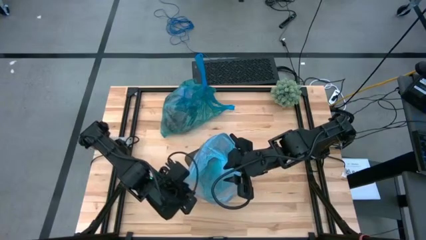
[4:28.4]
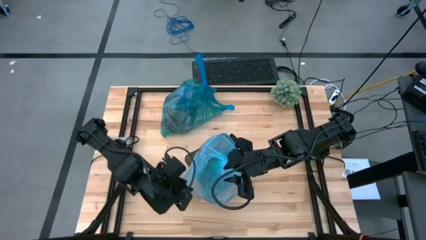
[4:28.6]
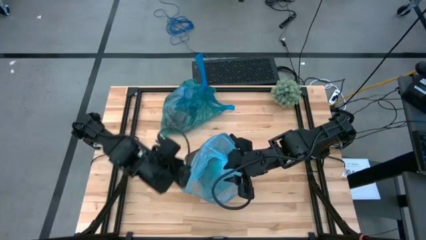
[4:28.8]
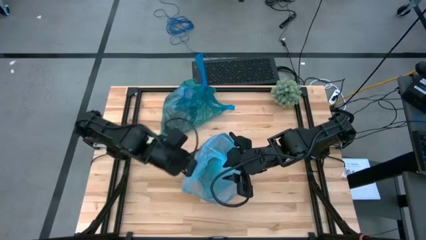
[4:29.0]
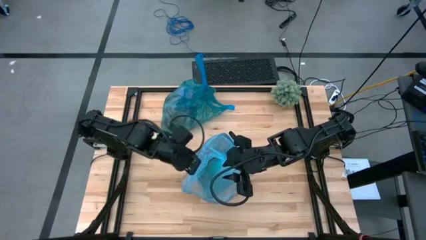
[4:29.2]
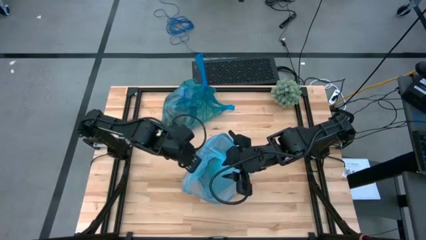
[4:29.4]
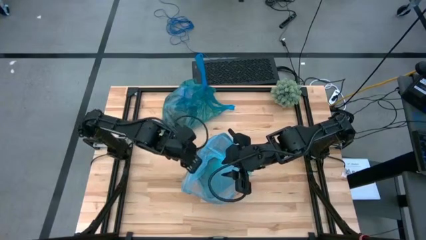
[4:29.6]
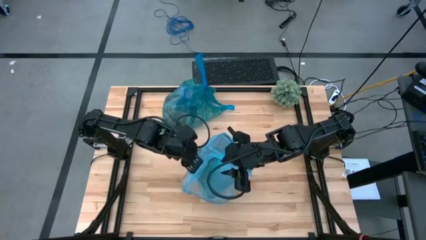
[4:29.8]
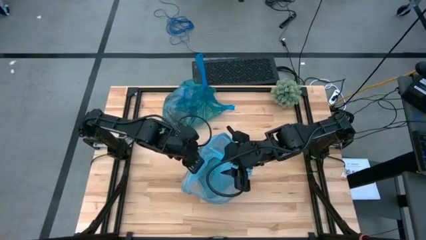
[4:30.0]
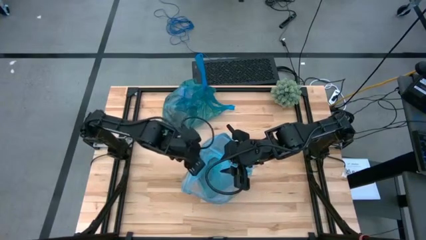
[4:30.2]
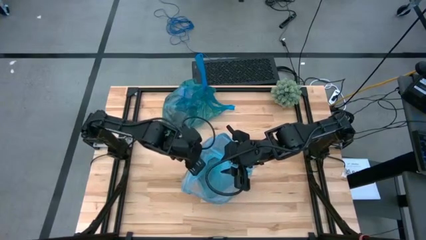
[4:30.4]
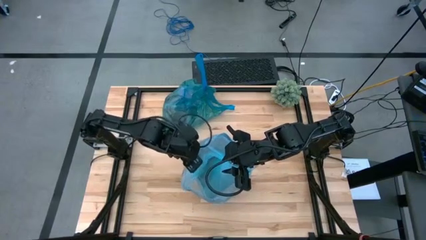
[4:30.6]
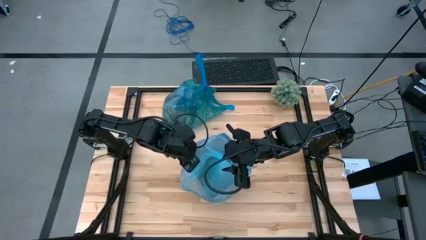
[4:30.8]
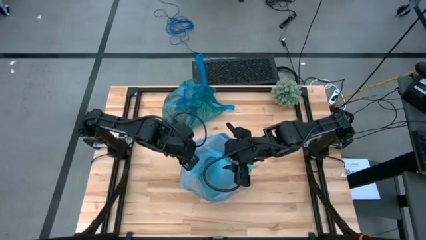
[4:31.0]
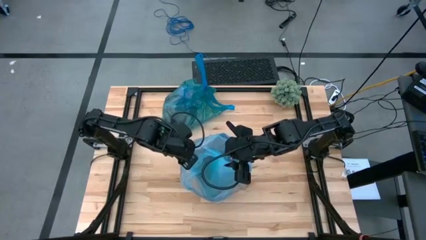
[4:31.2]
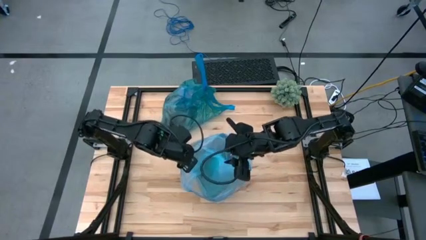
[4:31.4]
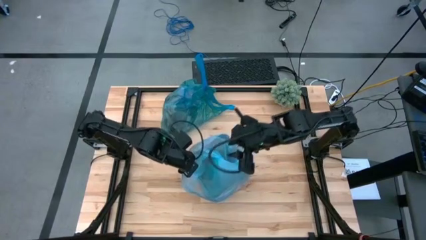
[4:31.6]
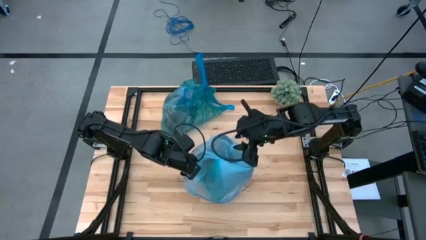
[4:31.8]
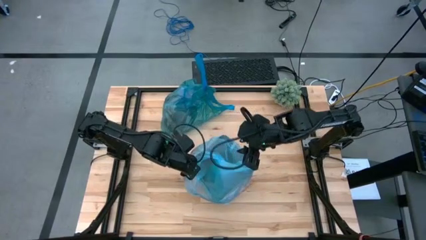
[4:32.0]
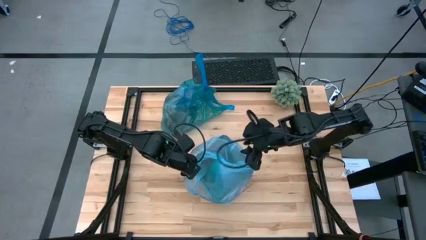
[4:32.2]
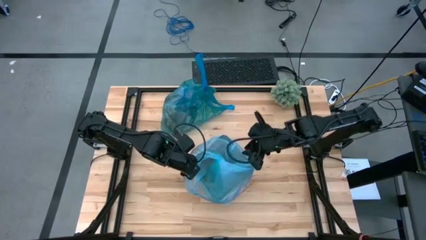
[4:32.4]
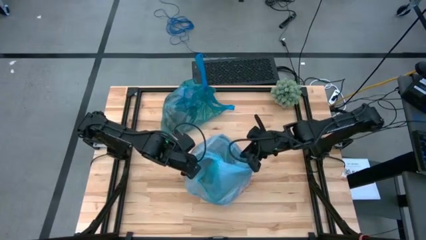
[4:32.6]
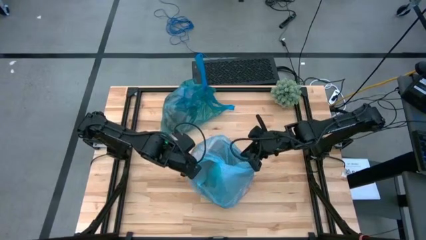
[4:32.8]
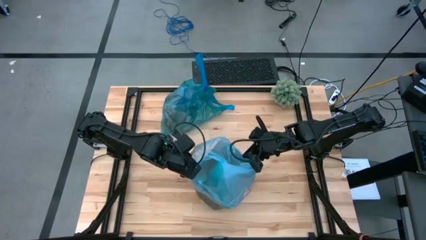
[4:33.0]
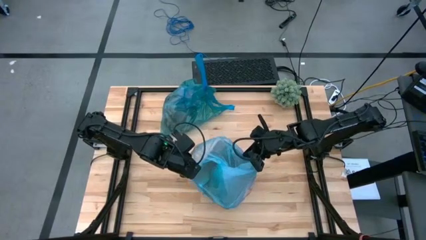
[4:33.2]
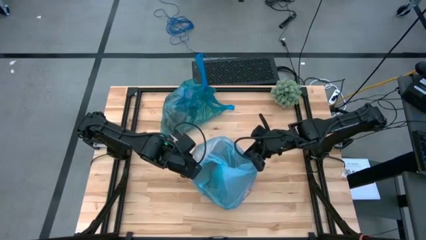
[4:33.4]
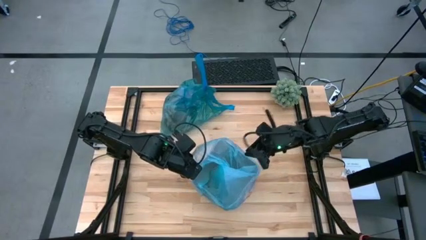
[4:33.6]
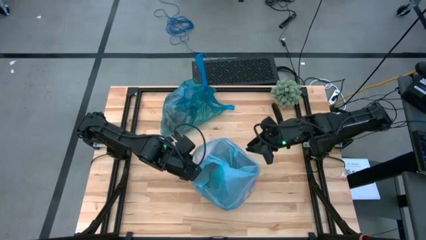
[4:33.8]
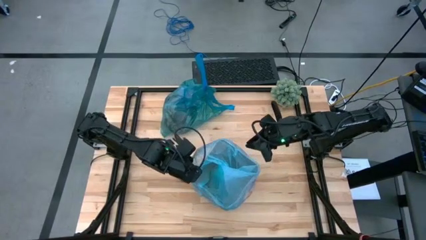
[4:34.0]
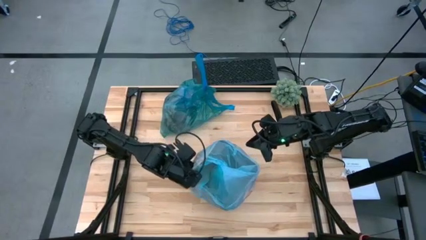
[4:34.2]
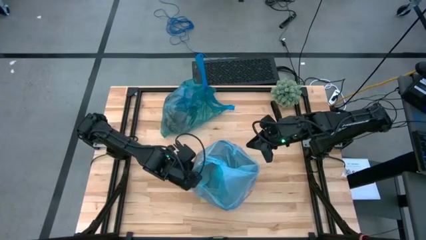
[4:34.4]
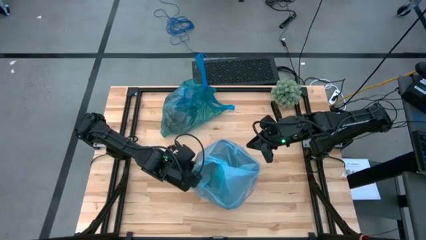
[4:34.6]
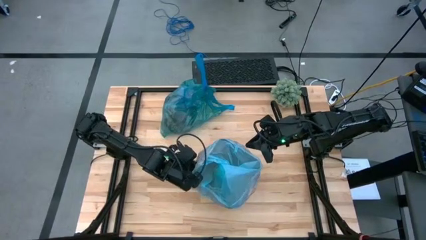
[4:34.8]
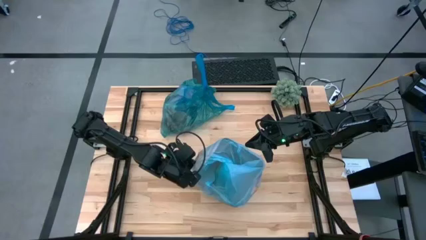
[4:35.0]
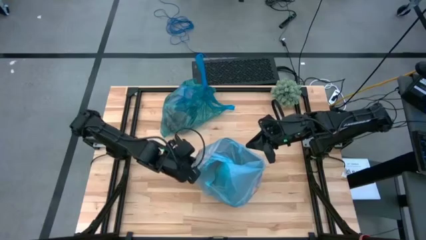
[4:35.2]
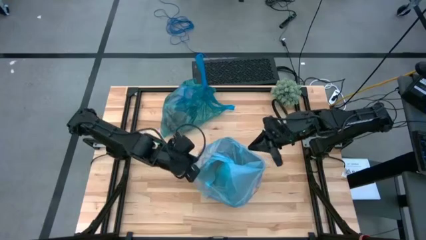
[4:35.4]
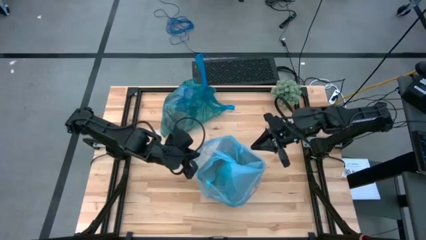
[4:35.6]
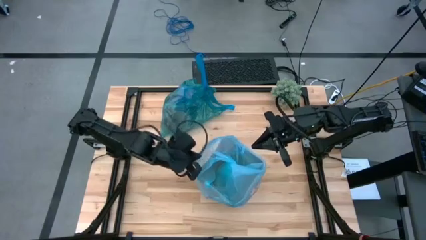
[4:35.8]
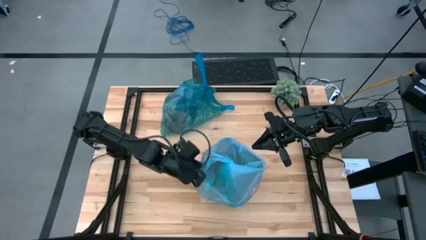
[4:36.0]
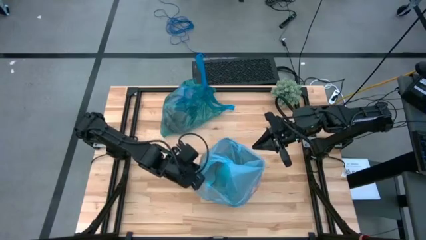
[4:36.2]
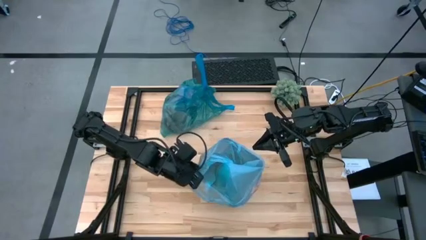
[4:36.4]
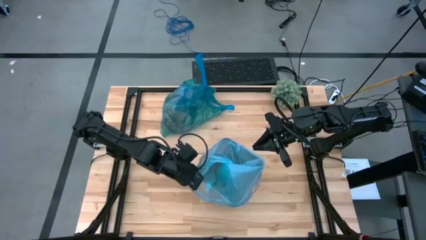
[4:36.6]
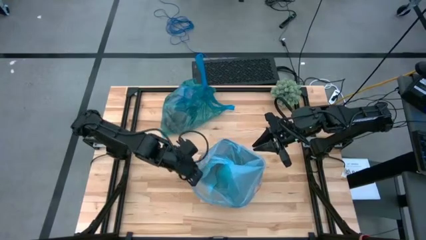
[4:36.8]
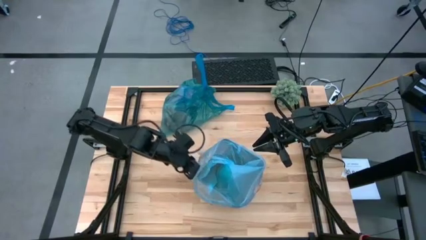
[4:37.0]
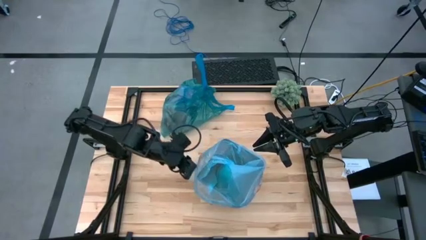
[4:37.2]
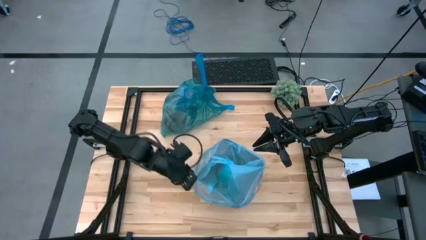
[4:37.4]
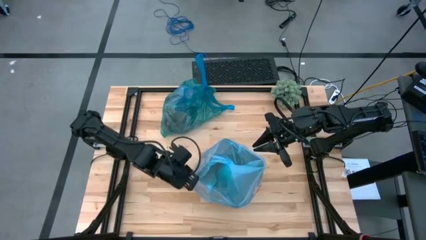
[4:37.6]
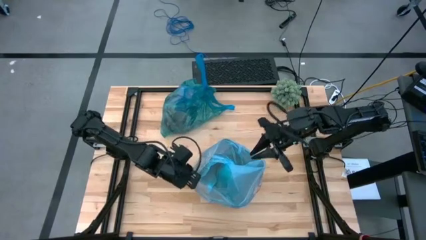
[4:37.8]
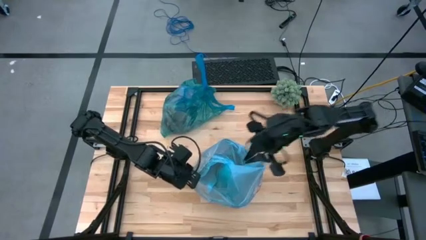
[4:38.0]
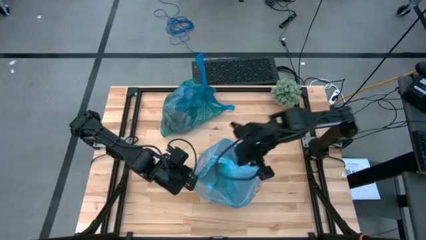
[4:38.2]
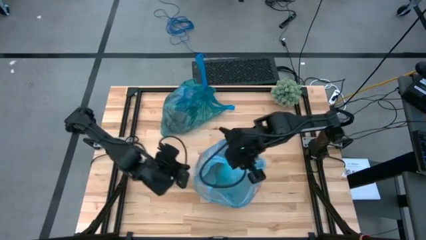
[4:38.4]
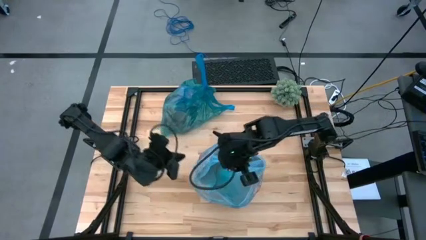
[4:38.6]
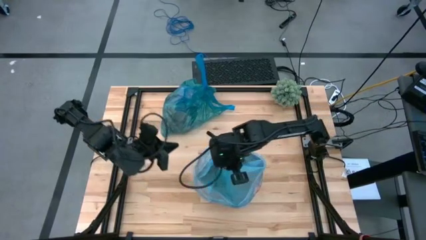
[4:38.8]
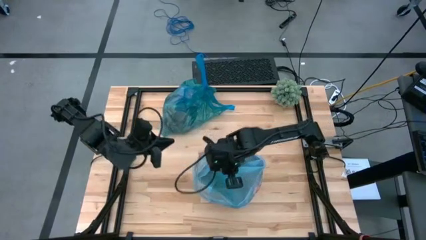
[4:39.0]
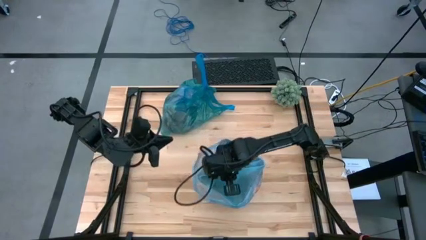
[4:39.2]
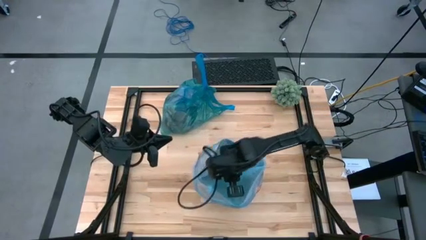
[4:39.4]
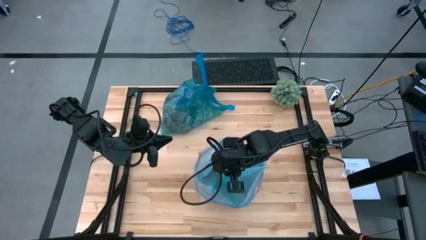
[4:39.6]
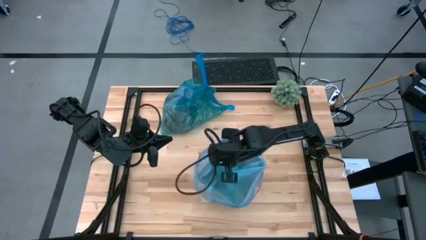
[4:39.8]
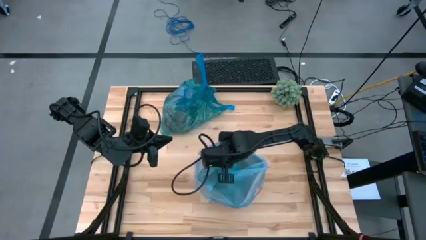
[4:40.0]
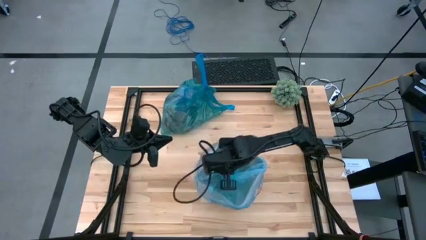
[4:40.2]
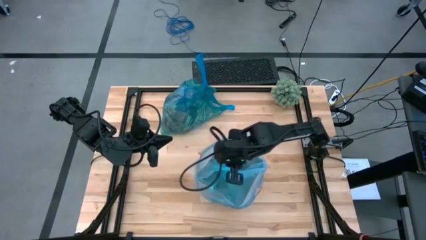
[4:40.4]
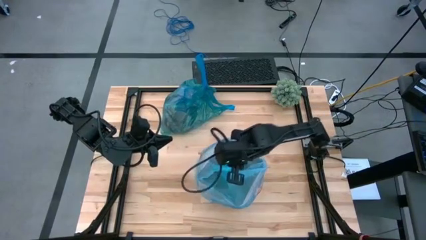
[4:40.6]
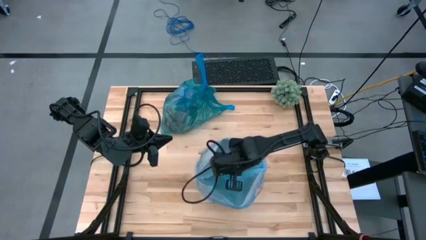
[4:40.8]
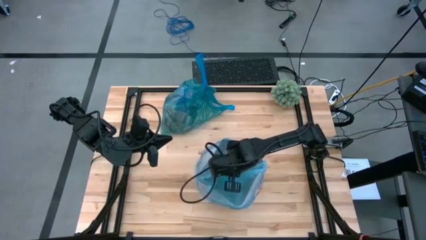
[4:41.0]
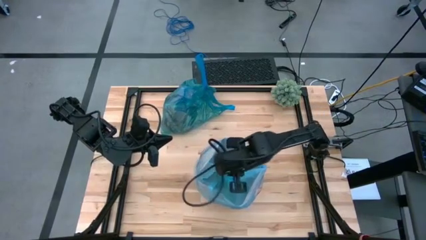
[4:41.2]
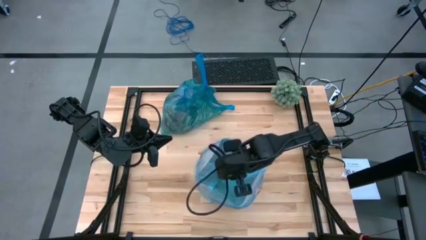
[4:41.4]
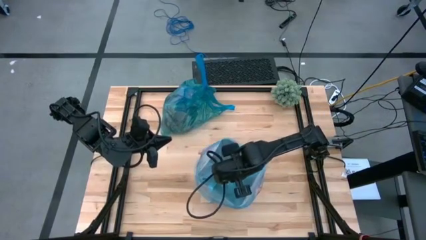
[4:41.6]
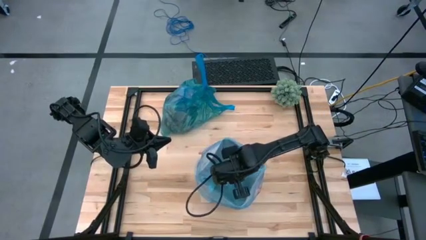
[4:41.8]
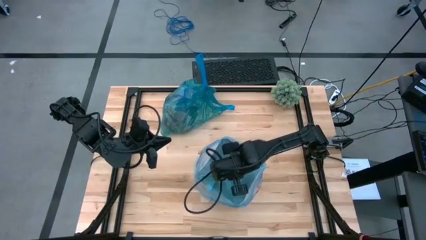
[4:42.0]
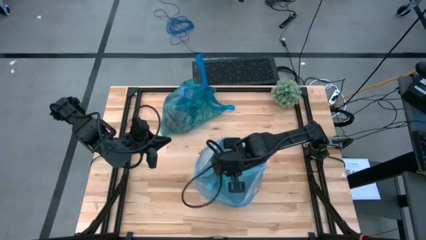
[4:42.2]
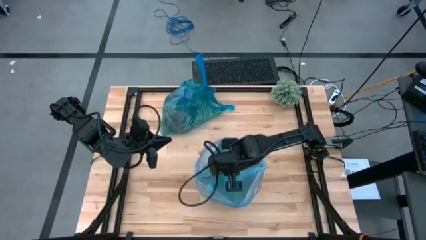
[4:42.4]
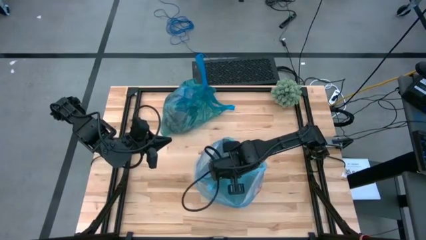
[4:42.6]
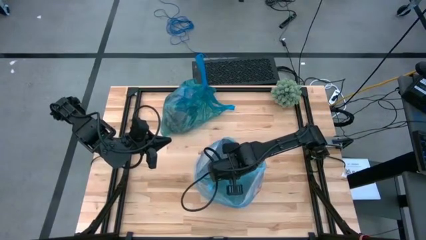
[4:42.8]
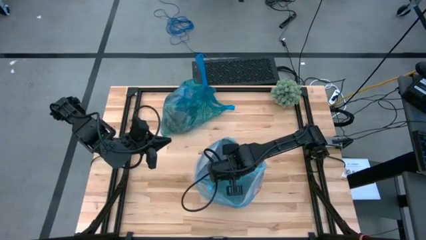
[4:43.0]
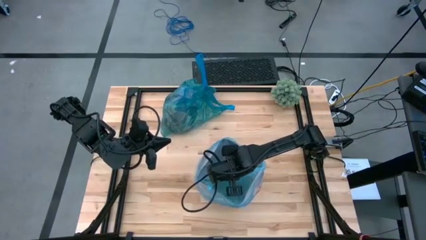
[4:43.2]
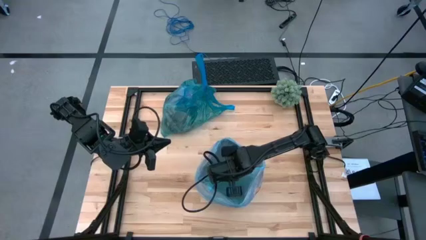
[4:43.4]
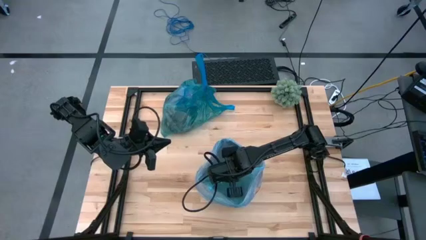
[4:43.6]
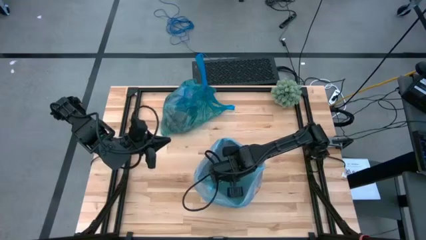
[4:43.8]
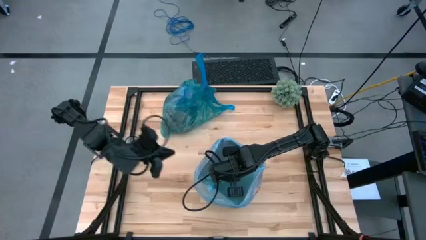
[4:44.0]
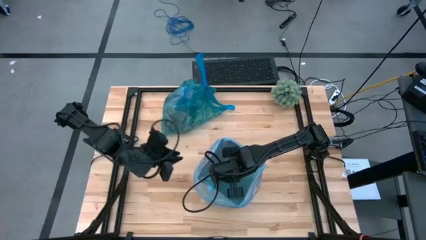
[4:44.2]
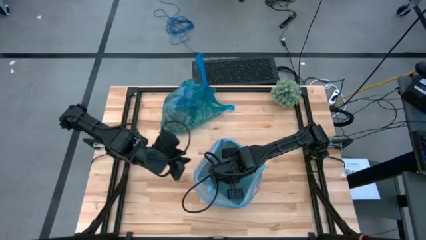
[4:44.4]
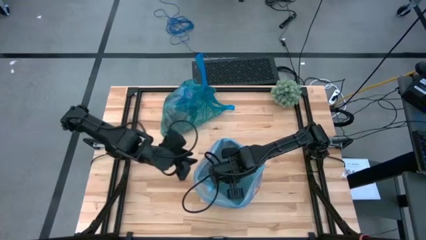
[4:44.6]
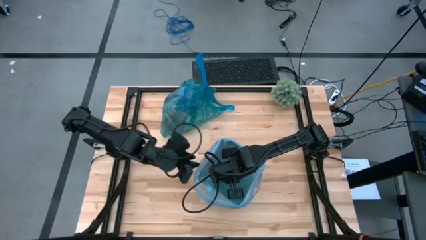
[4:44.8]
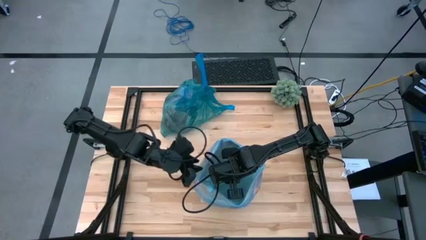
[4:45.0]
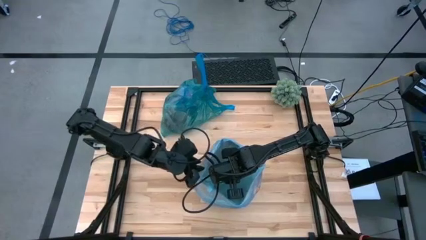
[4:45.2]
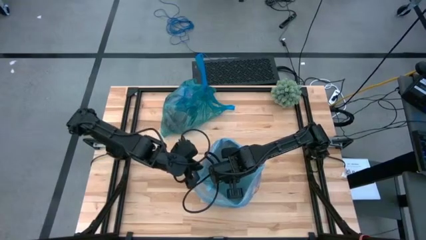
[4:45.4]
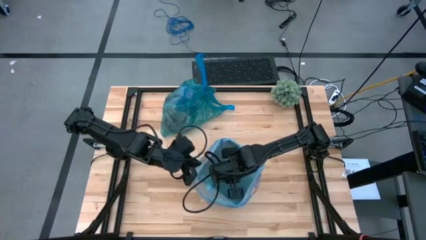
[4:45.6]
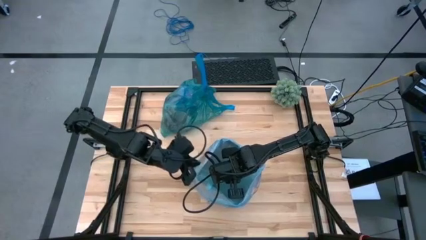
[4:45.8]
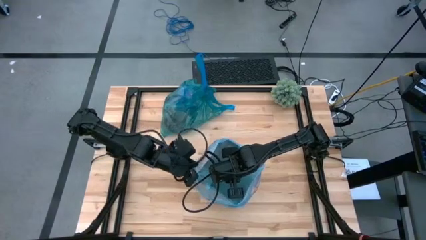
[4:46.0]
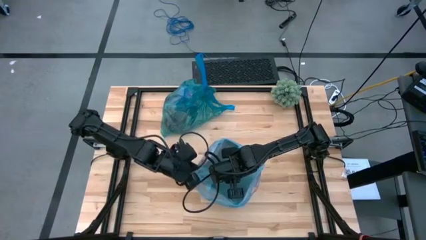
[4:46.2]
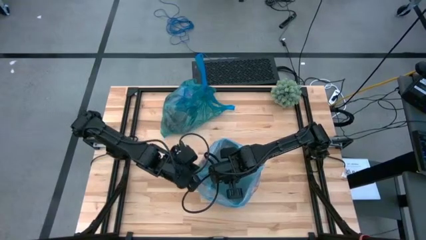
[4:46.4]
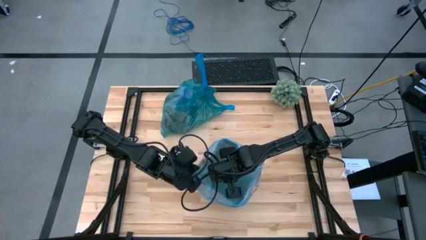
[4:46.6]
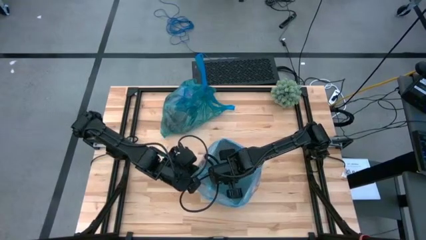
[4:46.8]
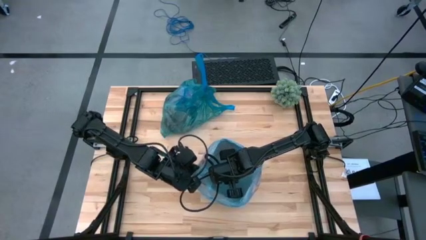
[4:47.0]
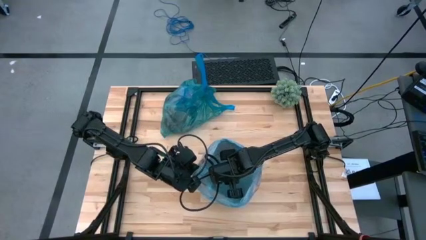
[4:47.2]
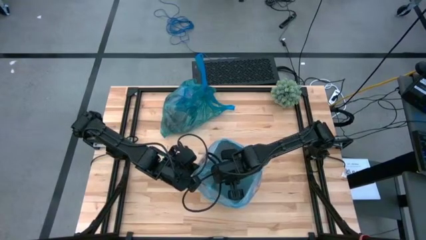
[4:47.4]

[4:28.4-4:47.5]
Task: place trash/remove bag and relplace
Insert the new trash bag into the trash bin
